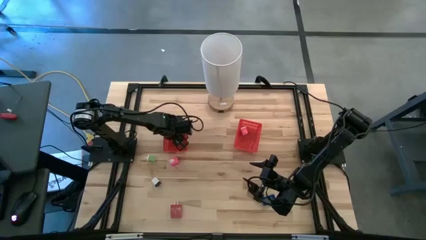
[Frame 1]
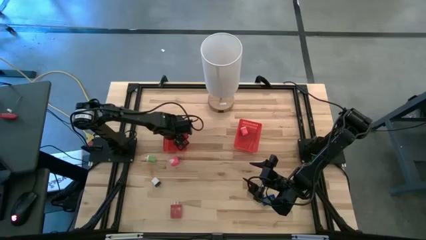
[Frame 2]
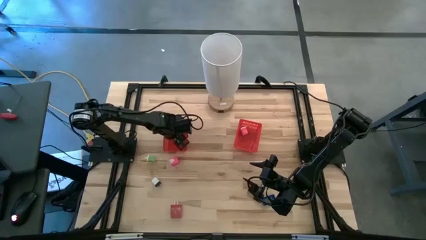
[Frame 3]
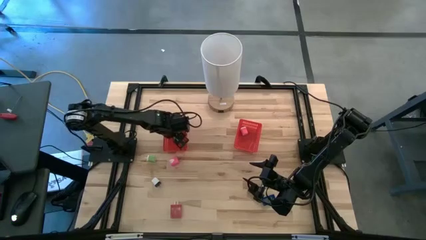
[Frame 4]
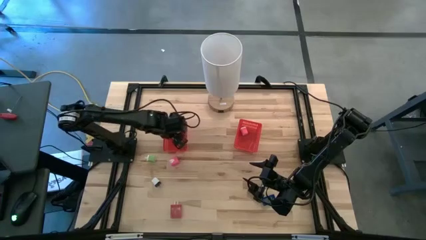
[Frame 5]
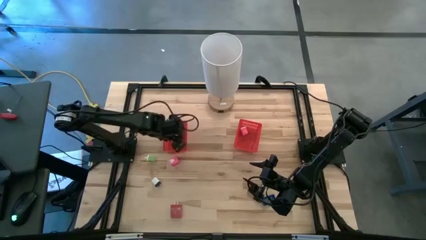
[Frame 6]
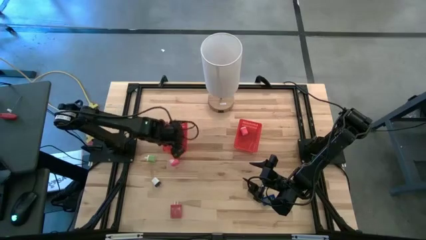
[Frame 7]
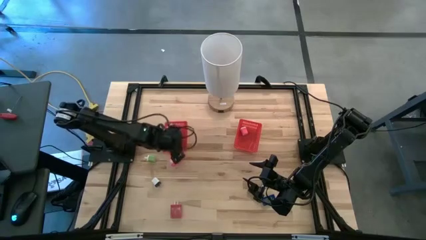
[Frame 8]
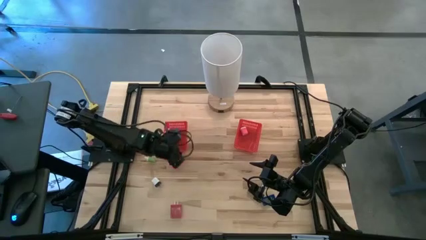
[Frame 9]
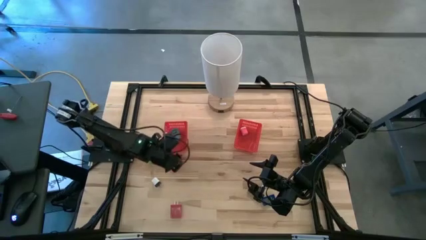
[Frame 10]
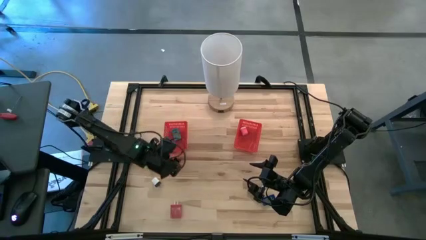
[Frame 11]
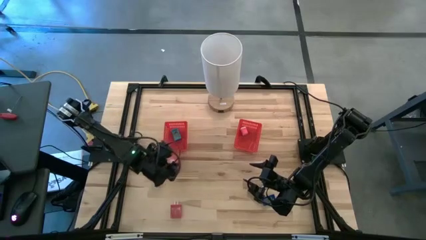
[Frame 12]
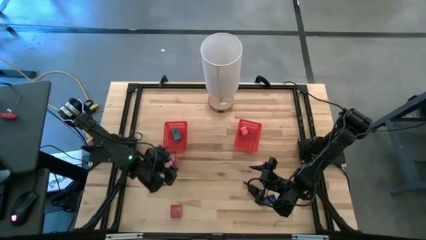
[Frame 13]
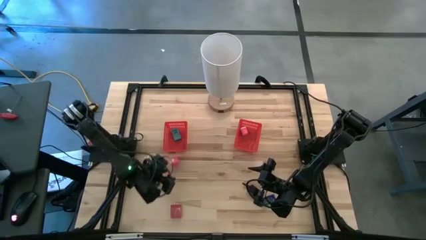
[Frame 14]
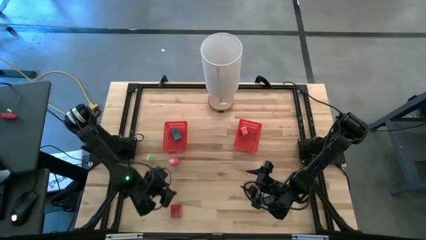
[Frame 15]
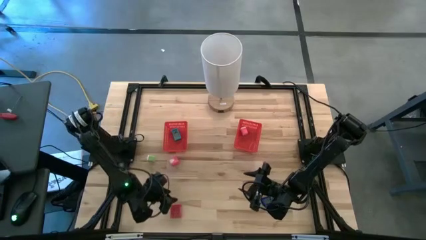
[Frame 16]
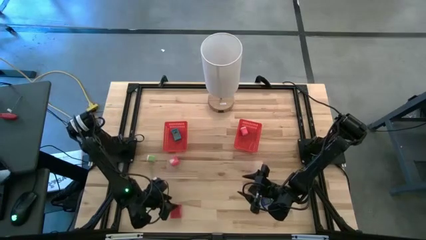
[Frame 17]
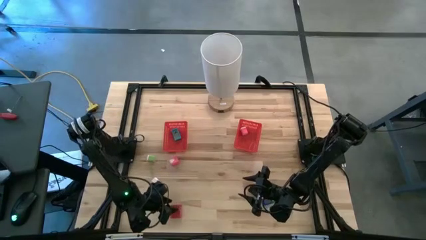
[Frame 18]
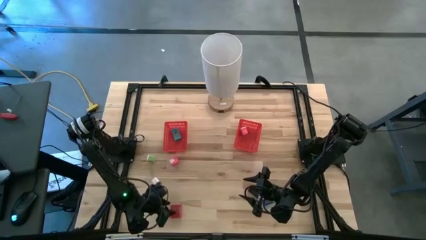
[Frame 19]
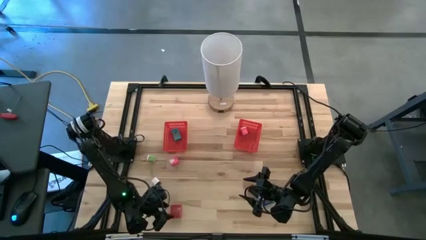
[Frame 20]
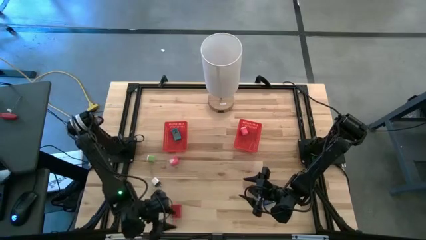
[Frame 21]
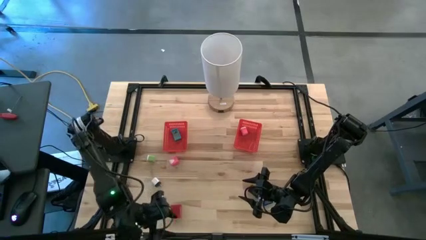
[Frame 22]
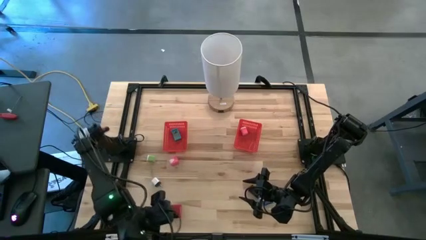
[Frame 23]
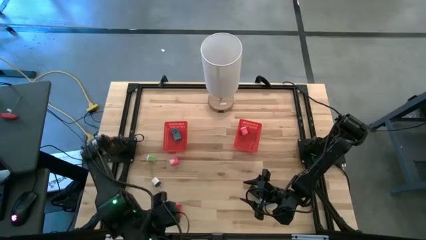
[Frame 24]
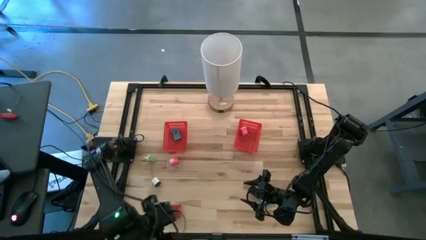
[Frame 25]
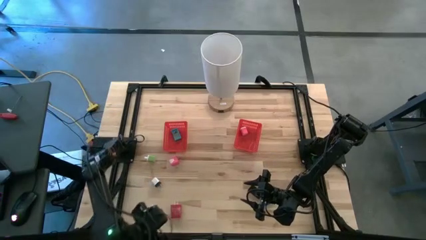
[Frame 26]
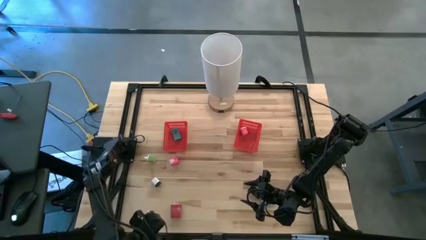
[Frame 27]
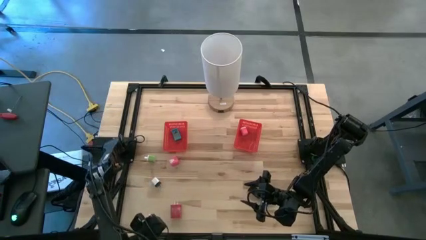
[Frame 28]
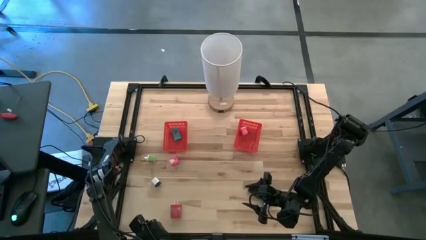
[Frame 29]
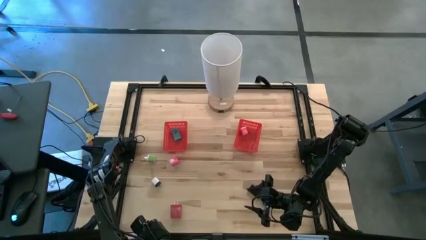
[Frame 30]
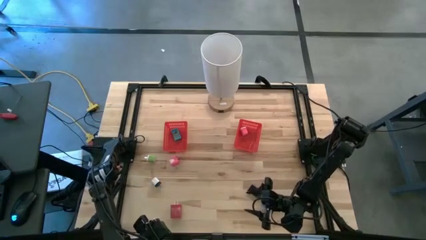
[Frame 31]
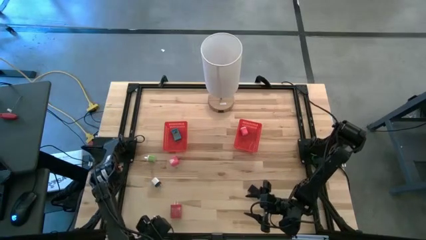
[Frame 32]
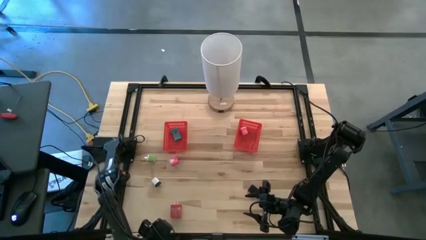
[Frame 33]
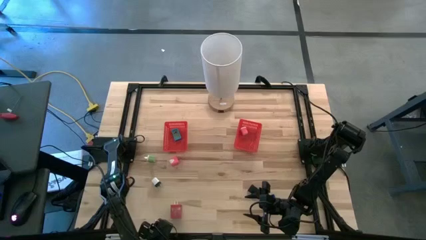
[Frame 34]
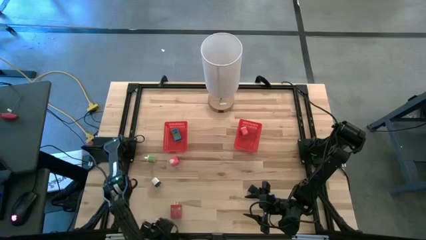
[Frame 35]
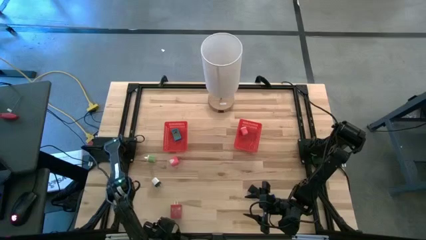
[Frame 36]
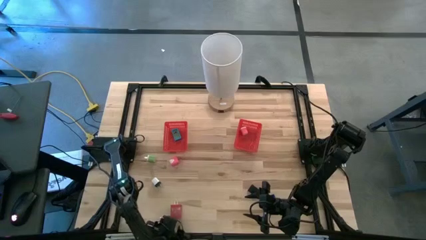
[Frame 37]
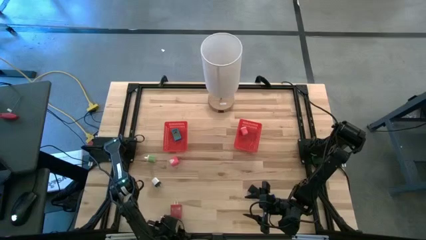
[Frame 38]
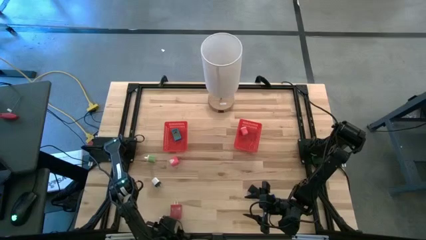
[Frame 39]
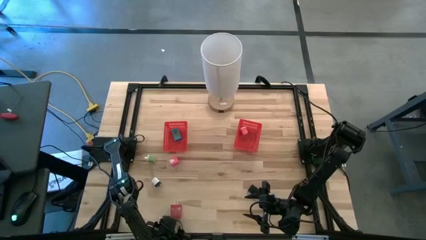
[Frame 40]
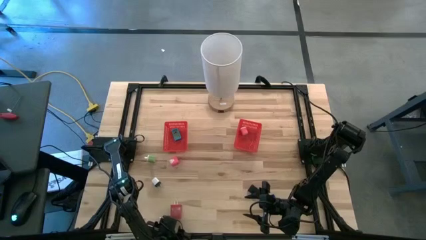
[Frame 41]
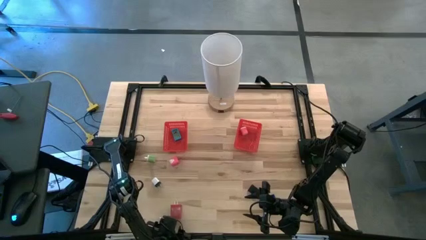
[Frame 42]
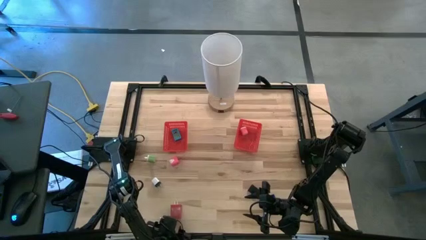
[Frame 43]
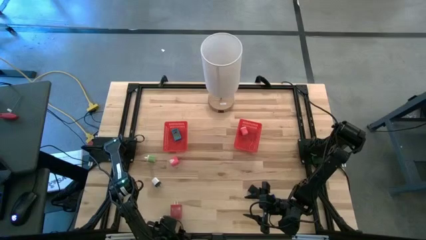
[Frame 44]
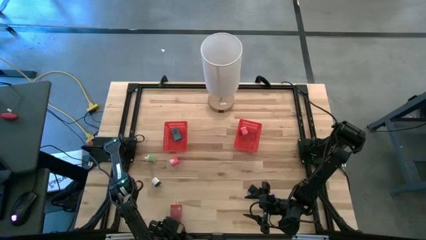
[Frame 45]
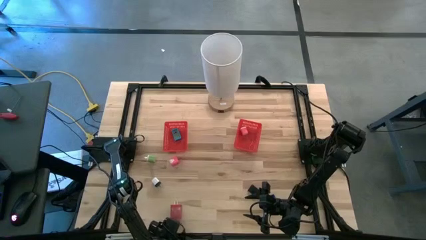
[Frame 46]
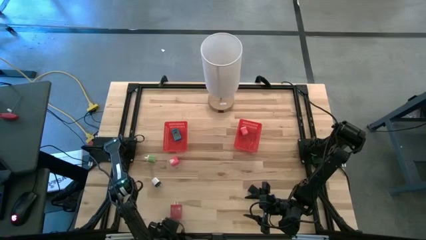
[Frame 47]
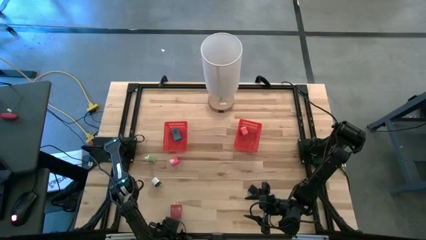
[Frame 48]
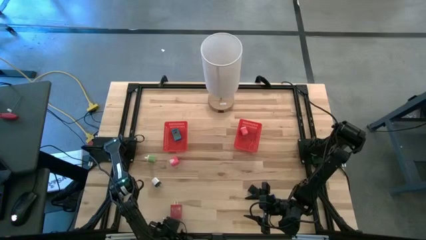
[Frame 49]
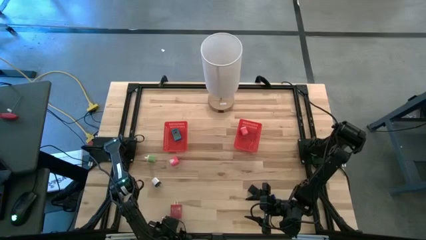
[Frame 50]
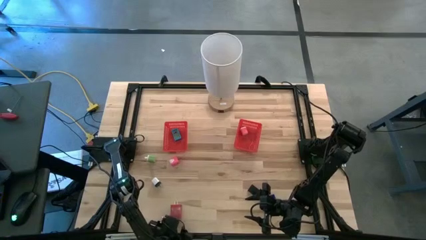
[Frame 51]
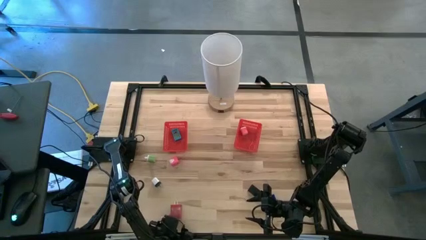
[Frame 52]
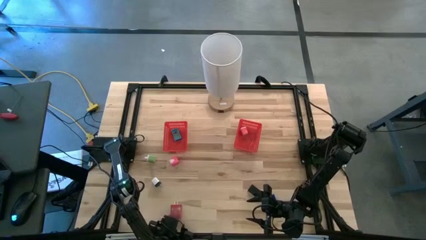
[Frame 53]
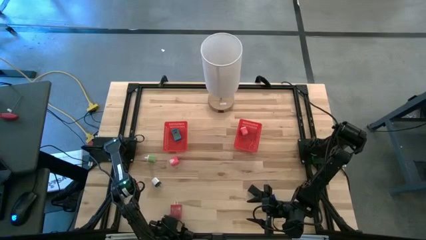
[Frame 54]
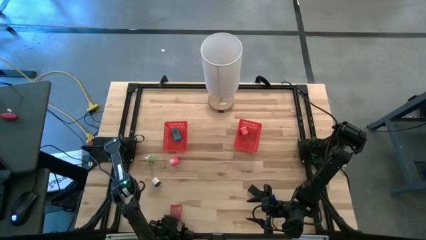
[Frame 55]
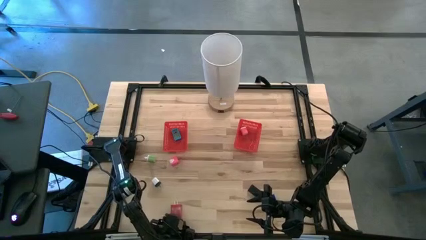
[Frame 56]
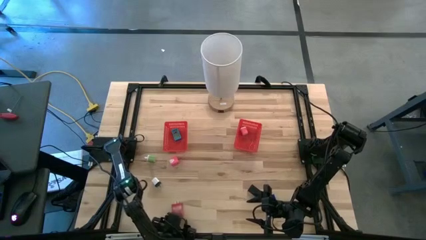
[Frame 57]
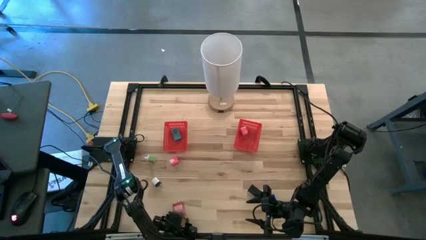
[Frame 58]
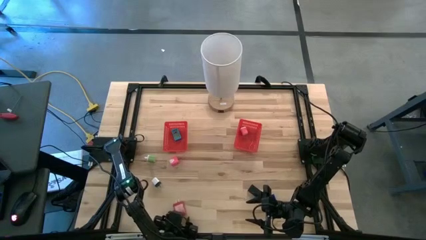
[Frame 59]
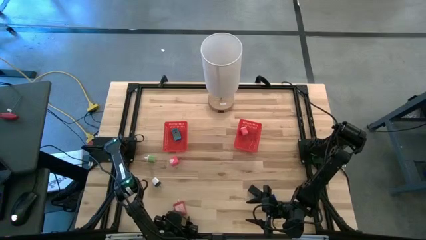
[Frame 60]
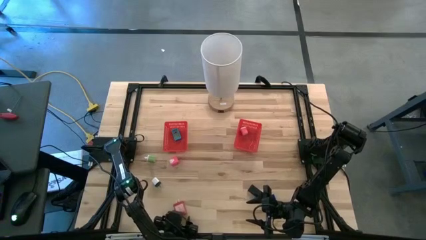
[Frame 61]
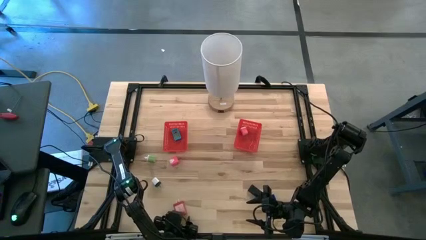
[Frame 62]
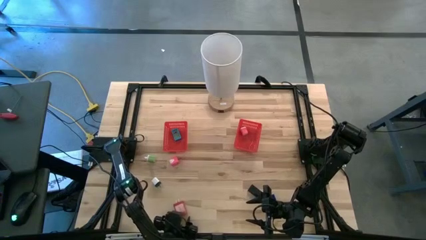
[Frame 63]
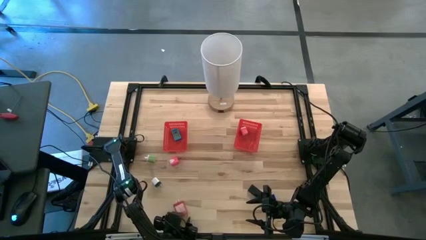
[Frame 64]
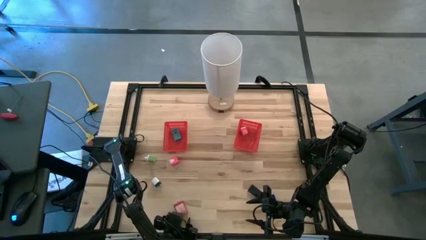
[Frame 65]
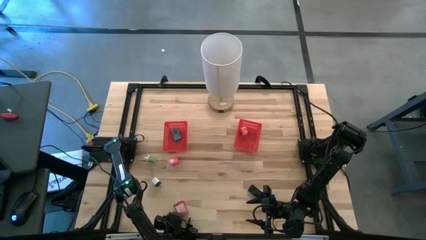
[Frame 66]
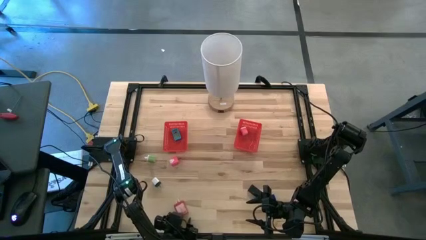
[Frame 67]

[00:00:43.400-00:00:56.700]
Task: Pick & Place Office items
Put the red charger adapter into the right red bin

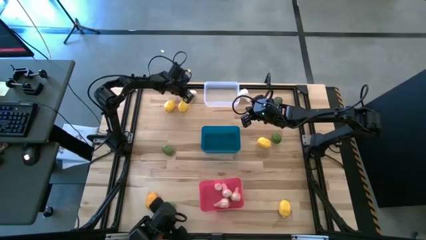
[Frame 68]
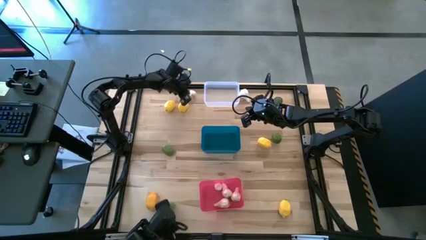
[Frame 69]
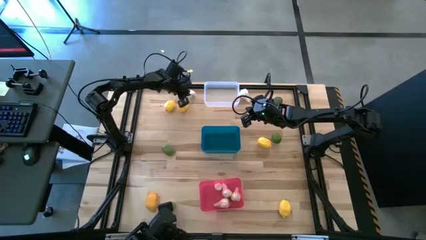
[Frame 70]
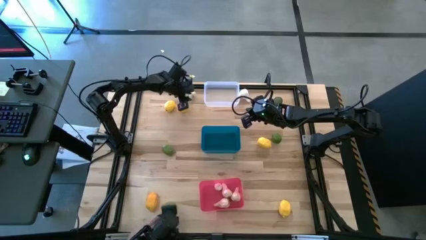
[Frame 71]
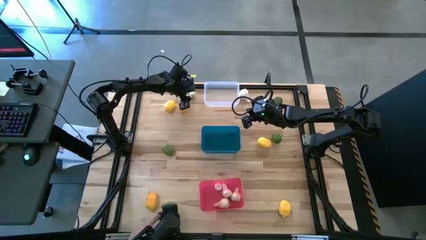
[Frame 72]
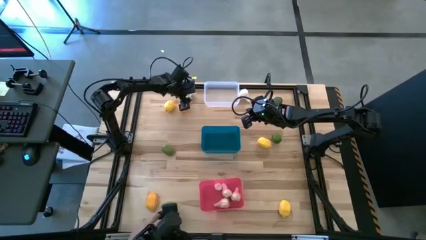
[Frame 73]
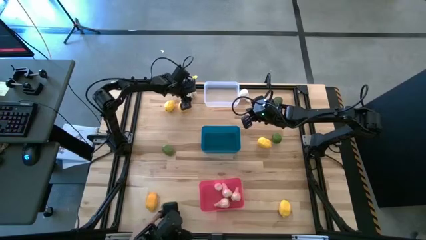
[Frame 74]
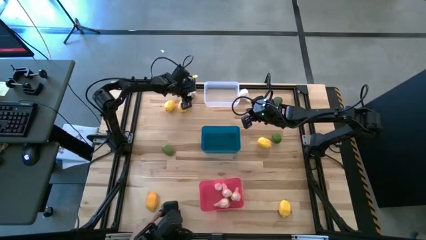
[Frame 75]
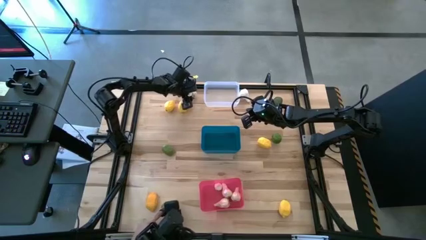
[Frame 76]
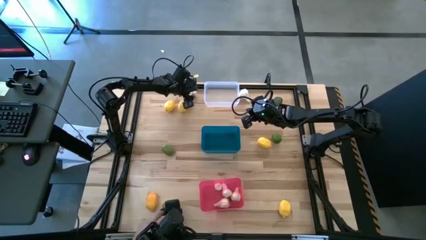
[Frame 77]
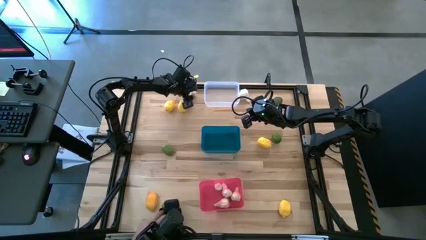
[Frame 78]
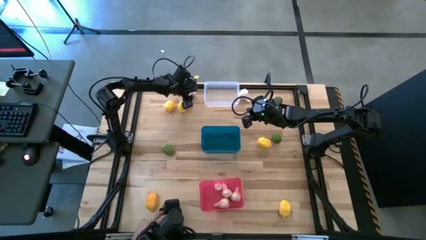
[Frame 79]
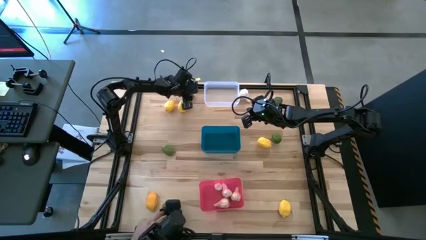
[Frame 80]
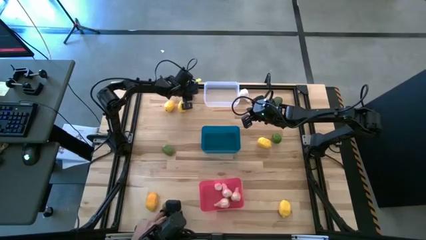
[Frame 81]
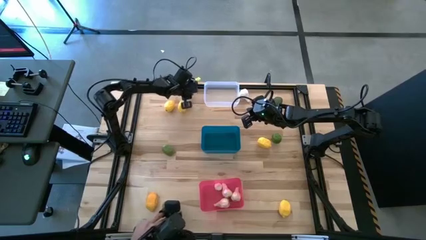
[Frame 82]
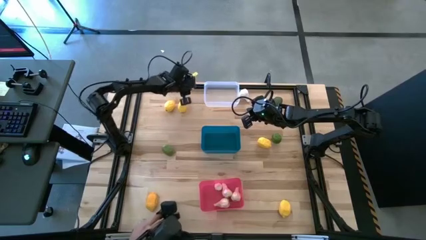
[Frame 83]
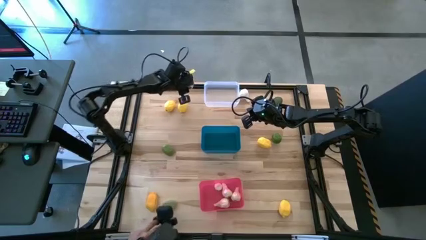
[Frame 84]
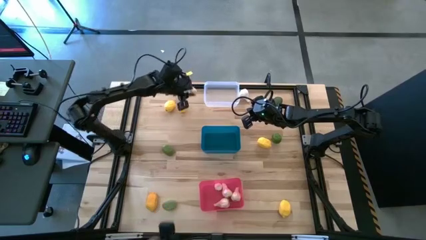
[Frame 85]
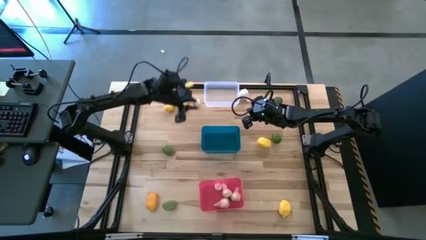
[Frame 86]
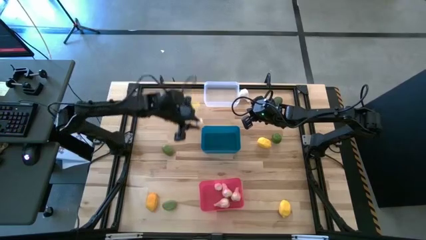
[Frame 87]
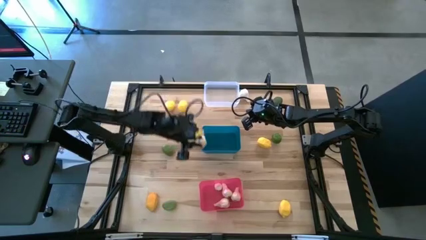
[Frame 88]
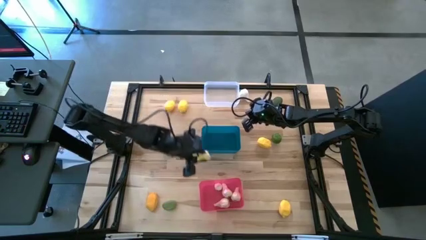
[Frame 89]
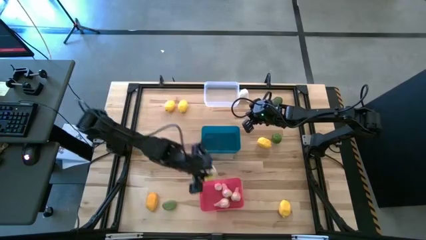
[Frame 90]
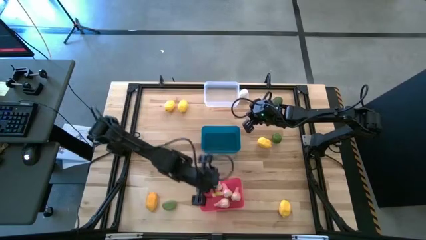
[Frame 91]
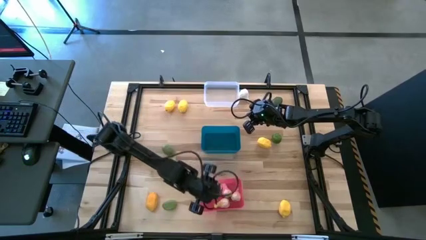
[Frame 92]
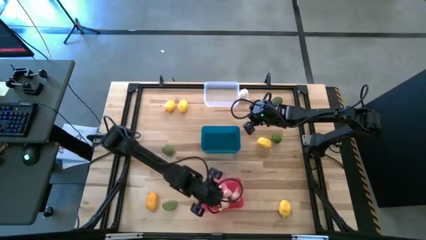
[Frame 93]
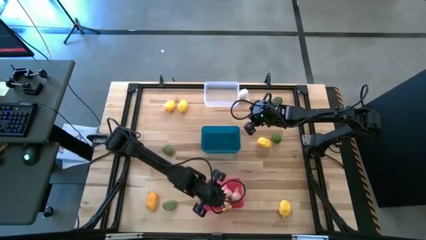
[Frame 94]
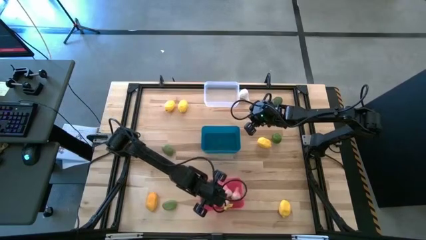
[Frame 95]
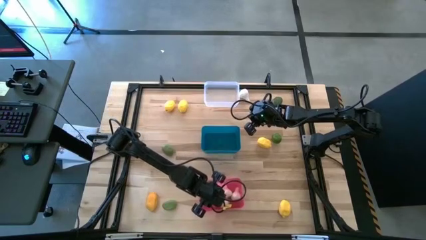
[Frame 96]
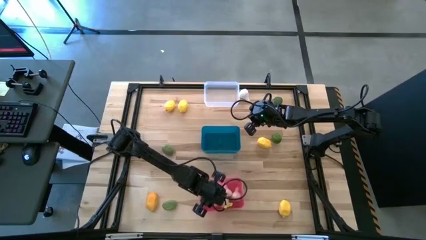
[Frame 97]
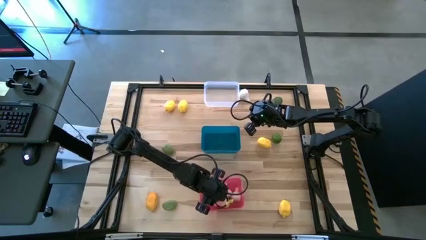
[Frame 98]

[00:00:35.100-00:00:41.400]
Task: Sort produce into baskets
Put the top left white garlic into the pink bin
